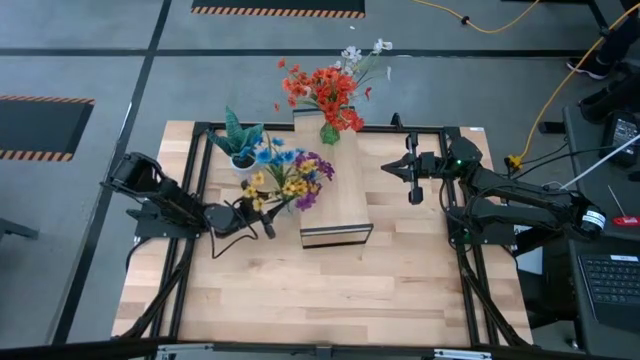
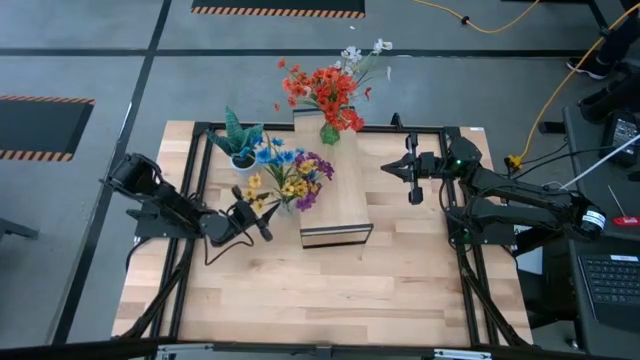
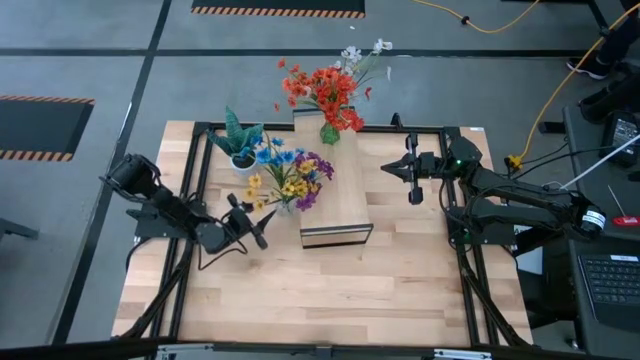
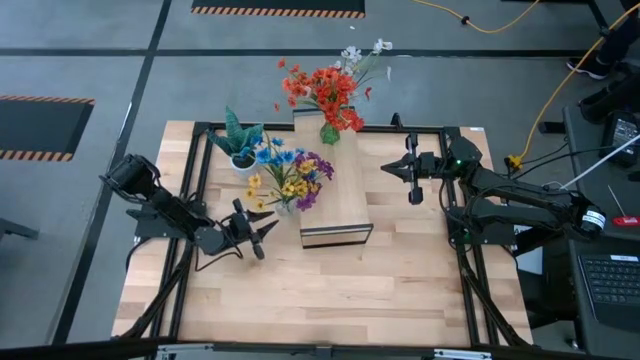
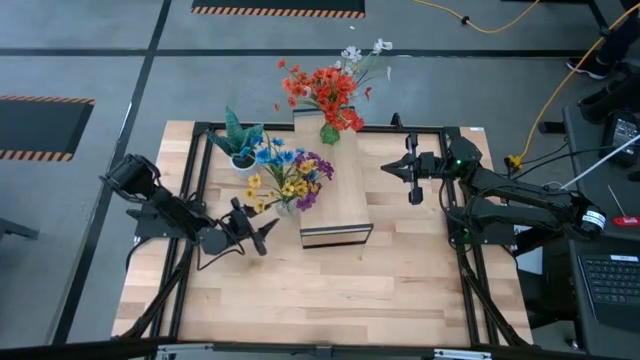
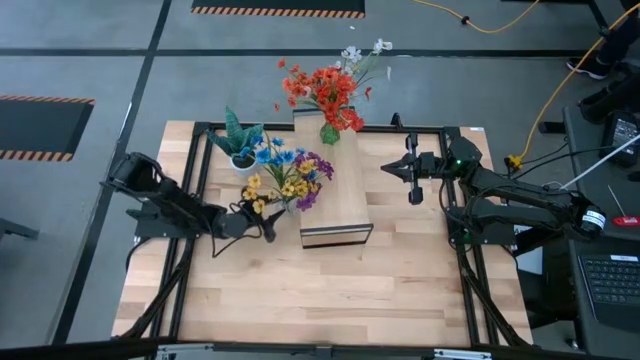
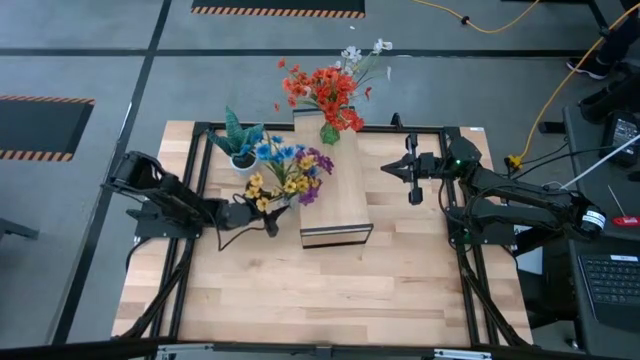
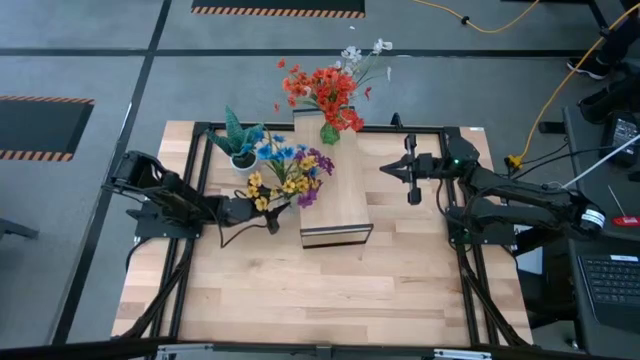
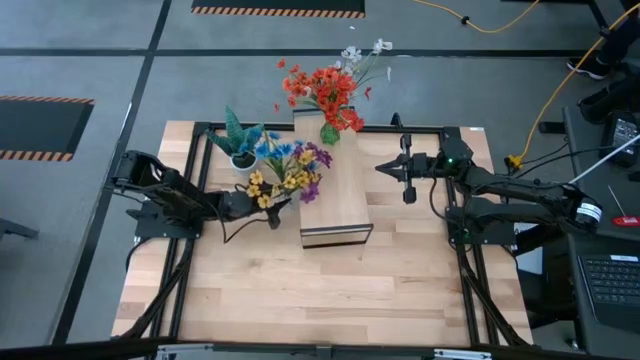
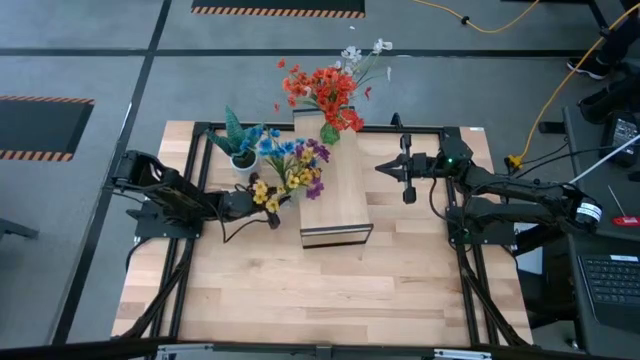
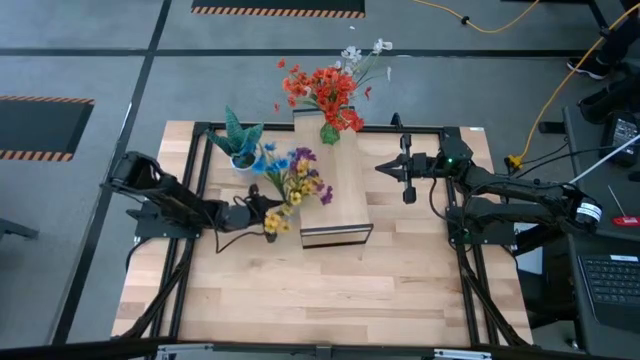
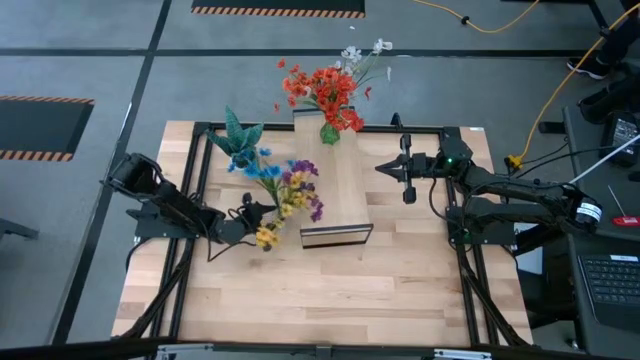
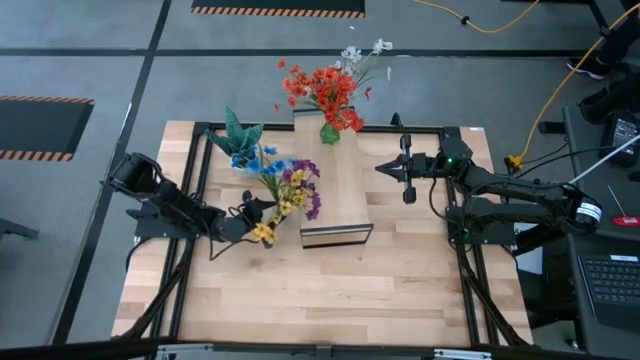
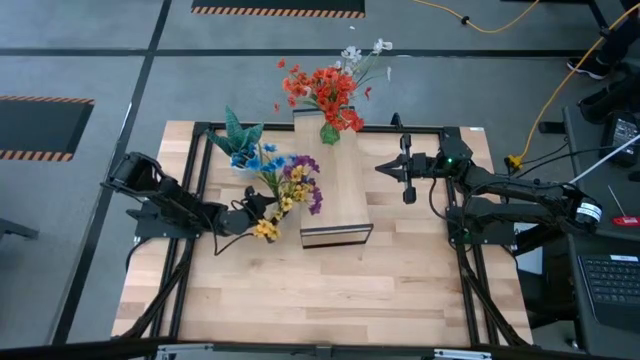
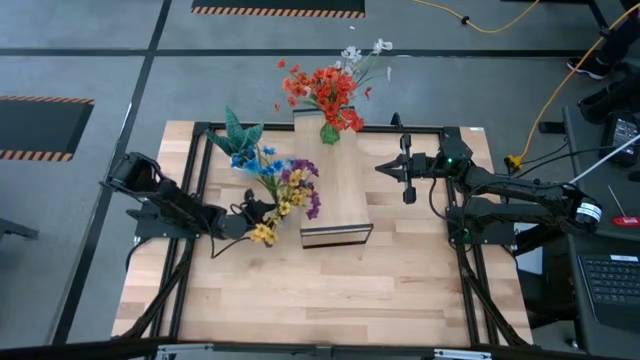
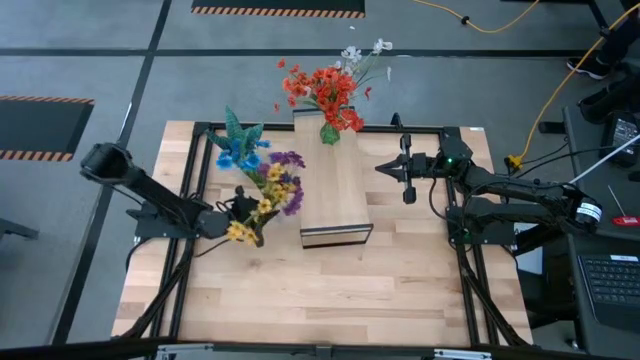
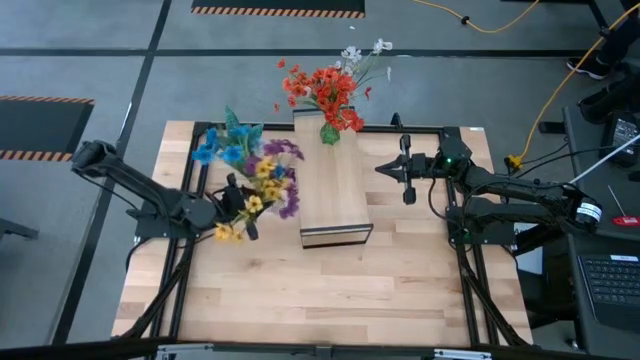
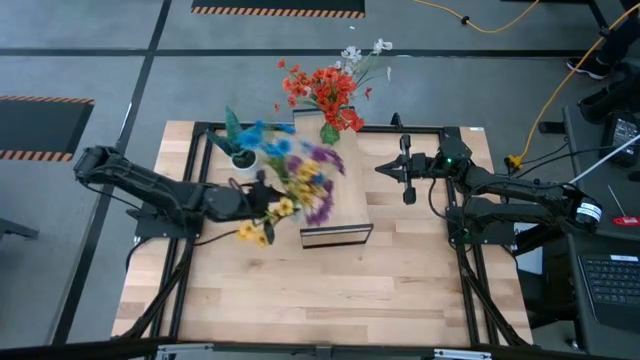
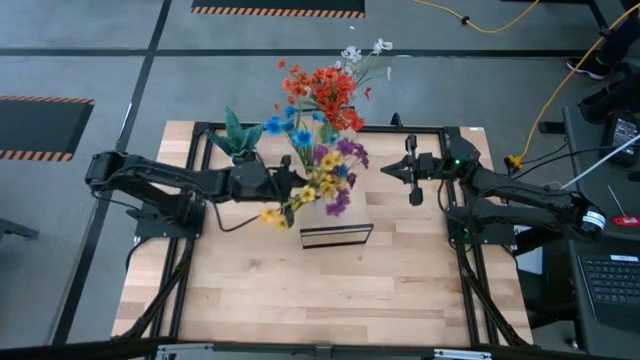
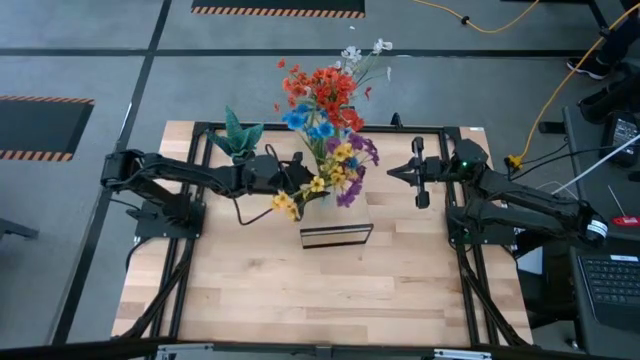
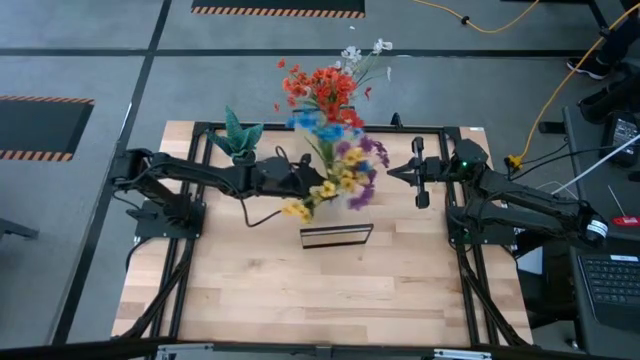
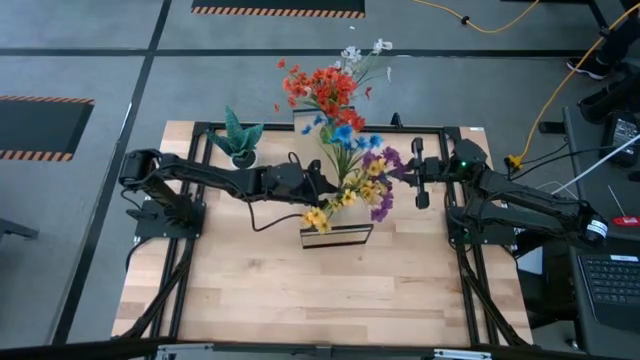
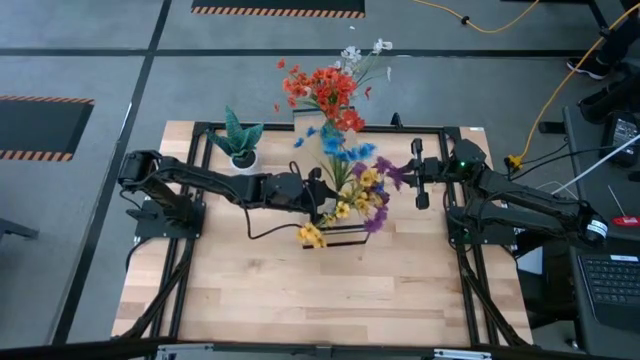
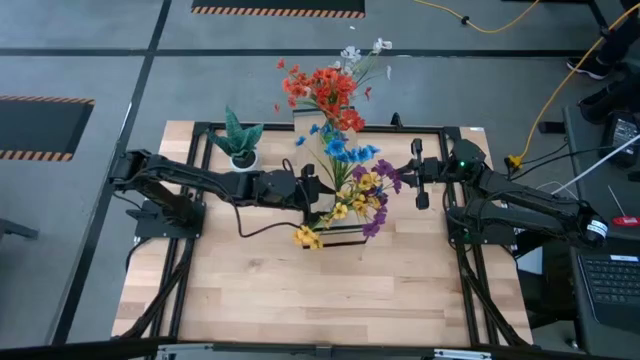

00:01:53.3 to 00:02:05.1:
Task: Pick and place flowers into a vace then onto a shelf
Put the transparent vase with flowers on the shelf

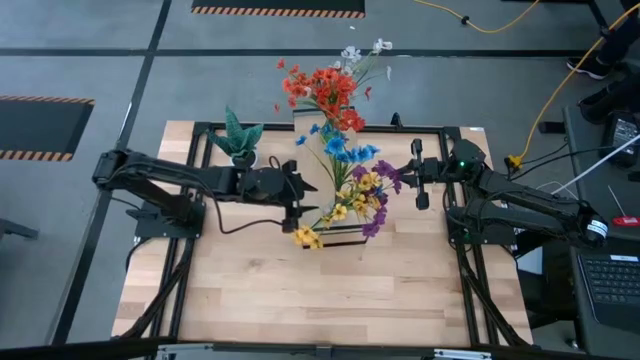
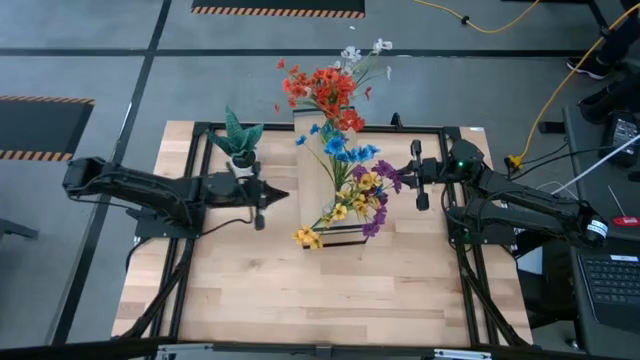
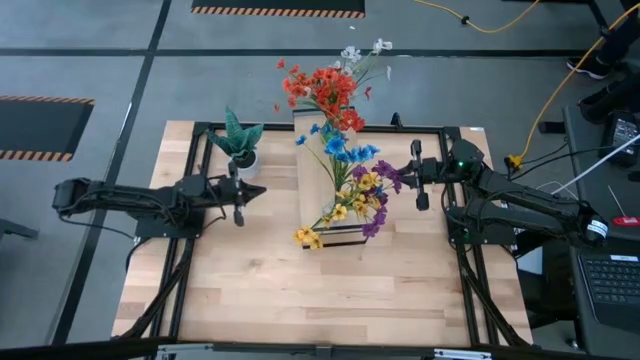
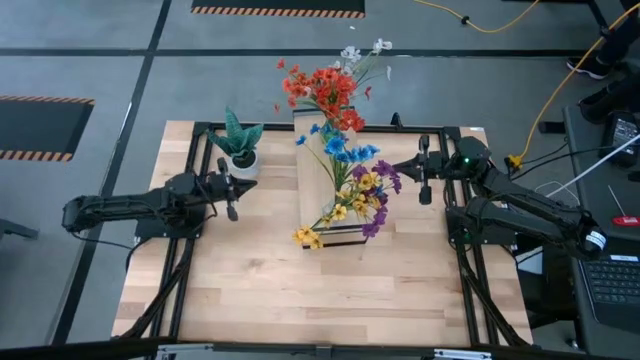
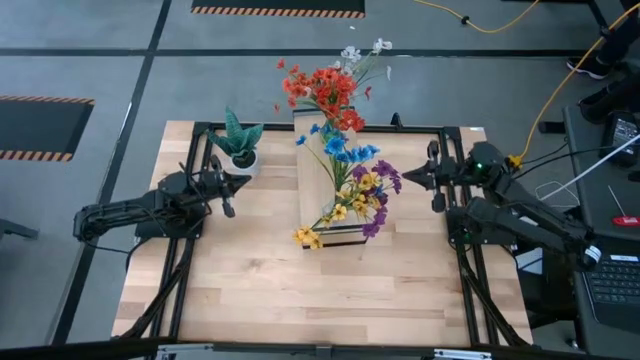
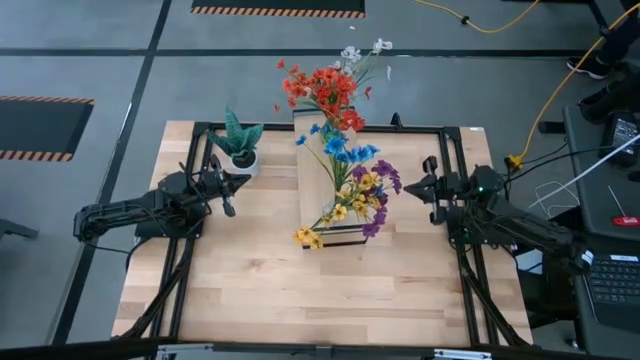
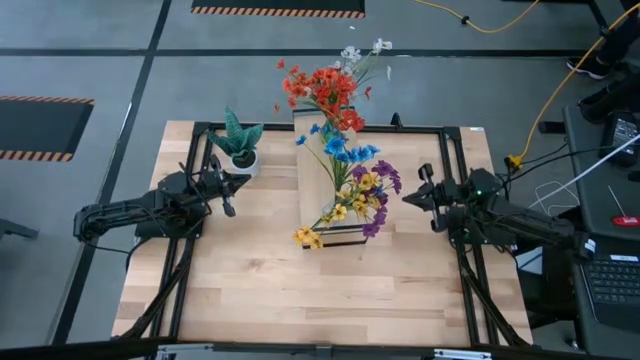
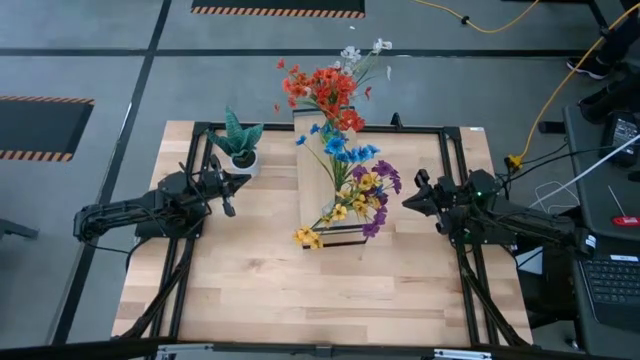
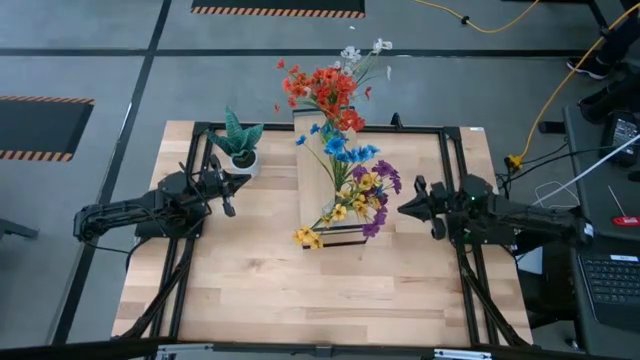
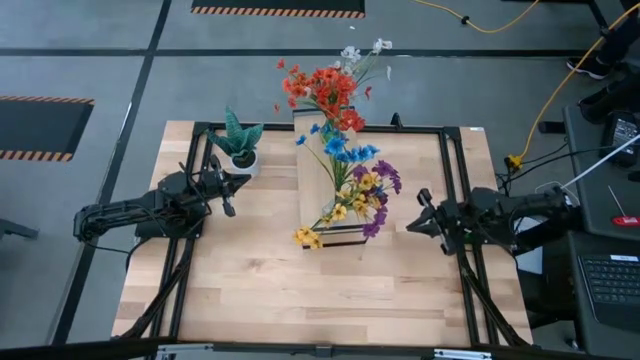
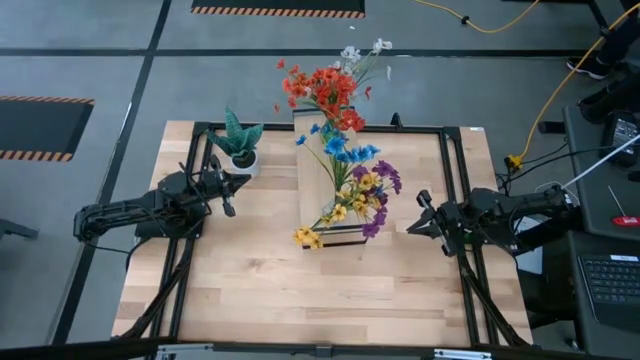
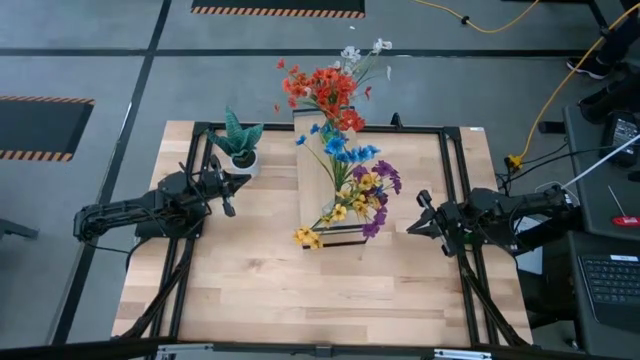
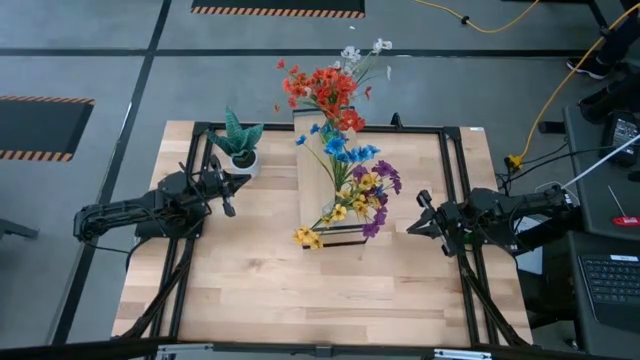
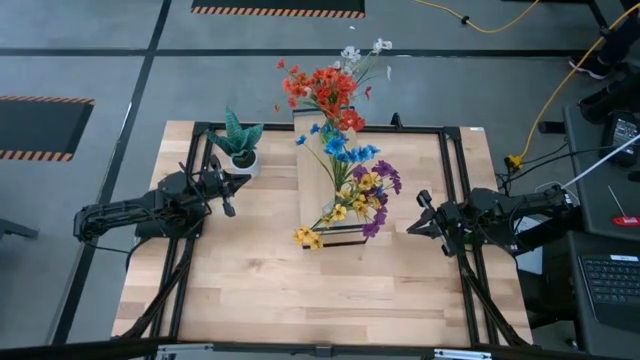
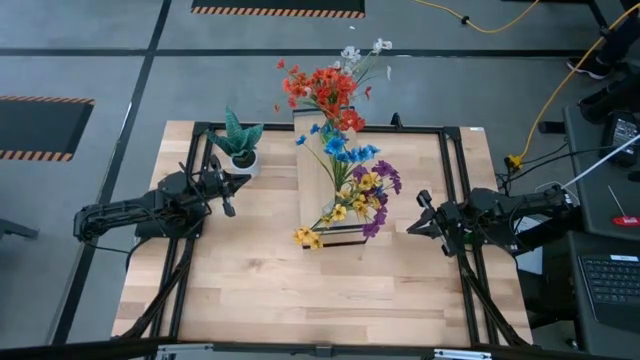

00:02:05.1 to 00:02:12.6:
Return to Home Position

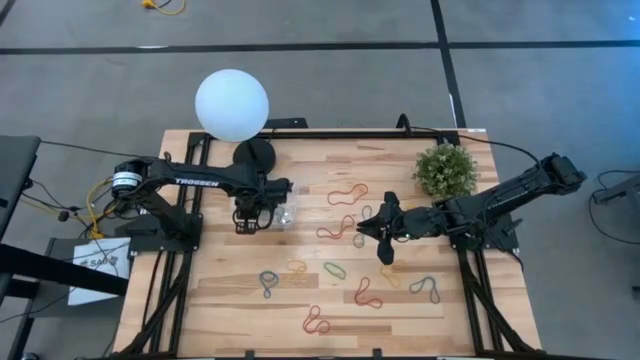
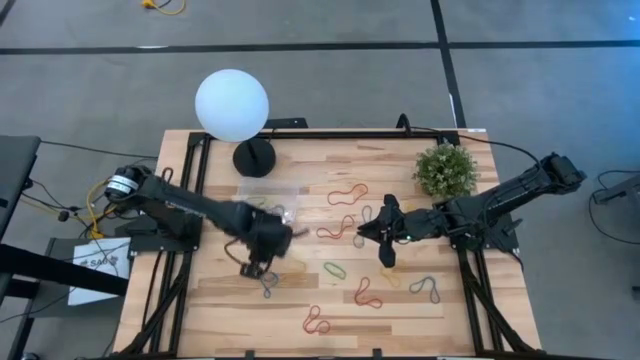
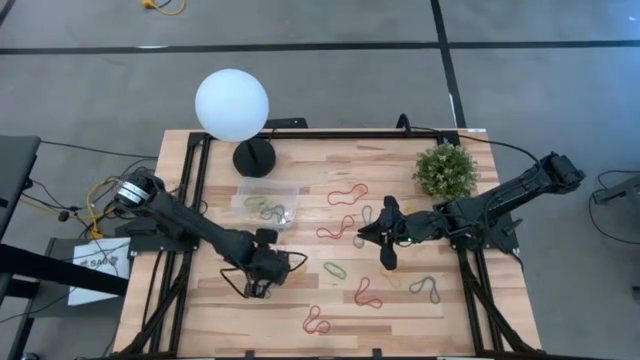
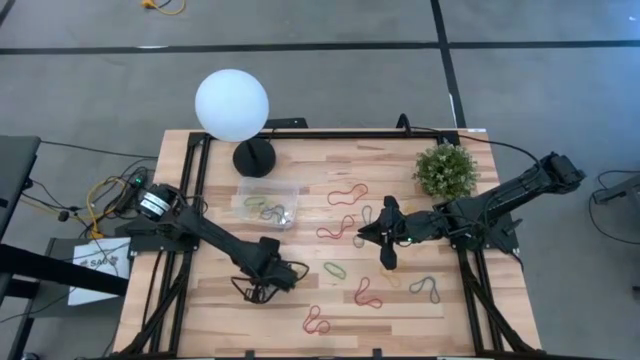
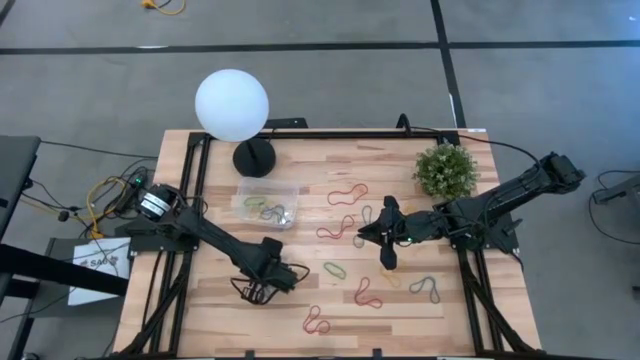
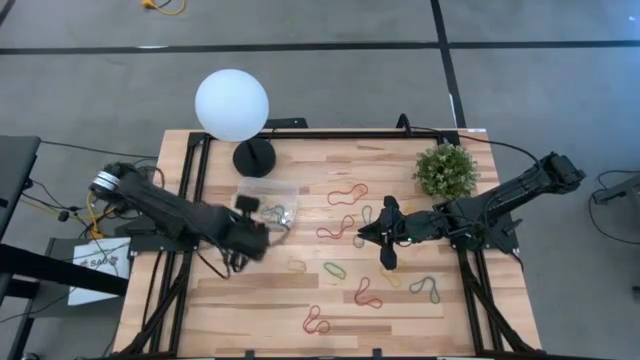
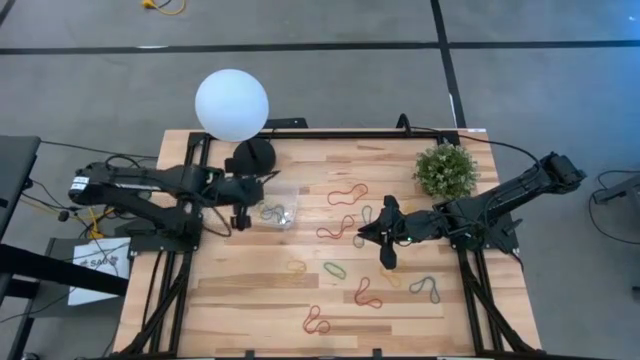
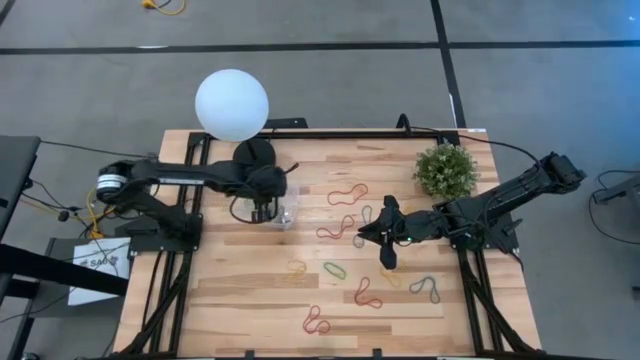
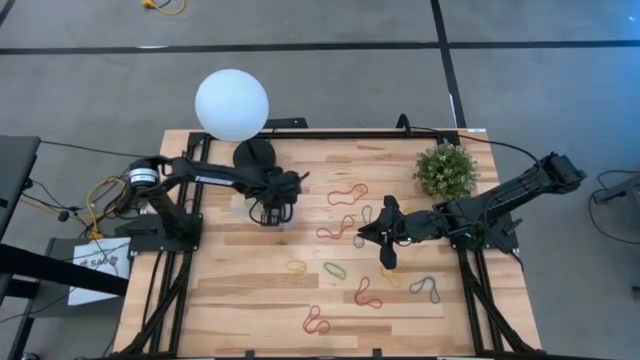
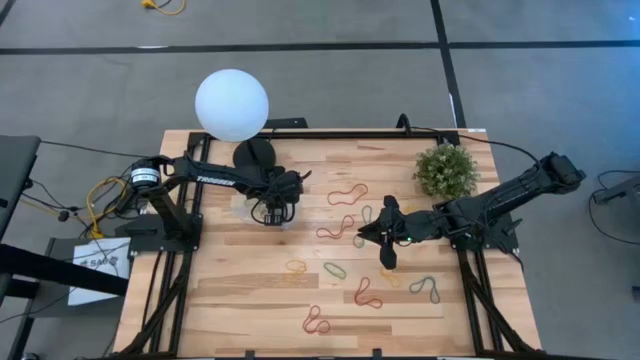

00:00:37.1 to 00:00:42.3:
Task: Pick and place rubber bands into bin
Put the blue rubber band into the transparent container
